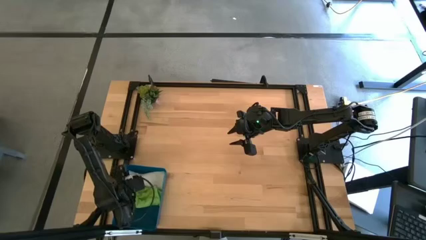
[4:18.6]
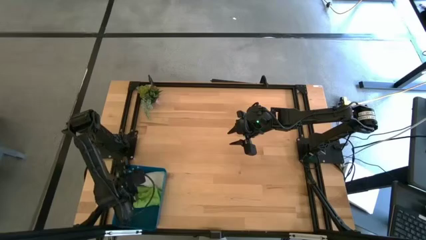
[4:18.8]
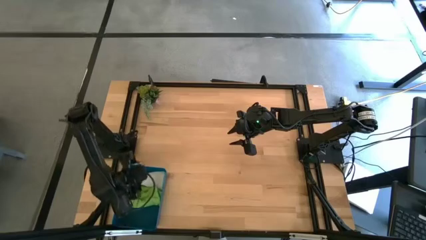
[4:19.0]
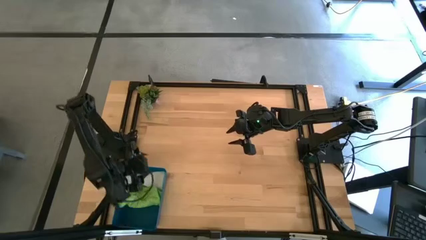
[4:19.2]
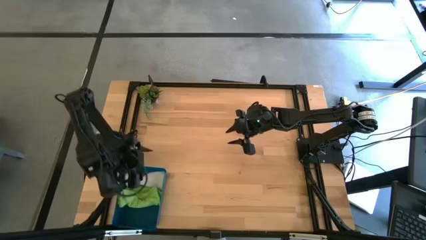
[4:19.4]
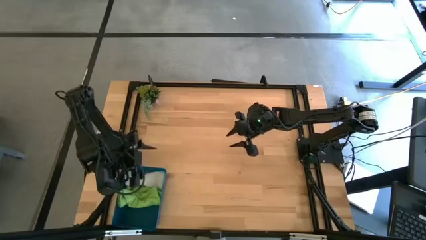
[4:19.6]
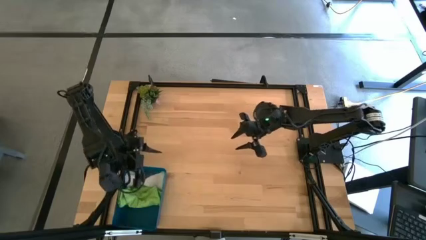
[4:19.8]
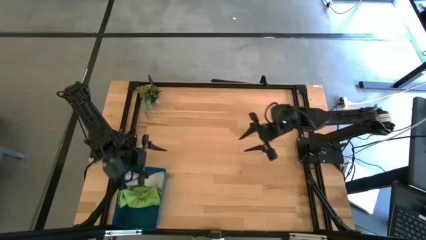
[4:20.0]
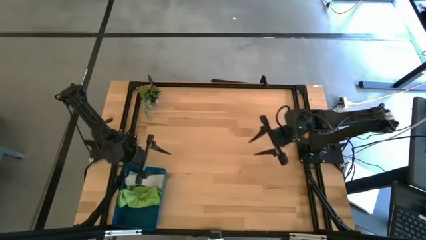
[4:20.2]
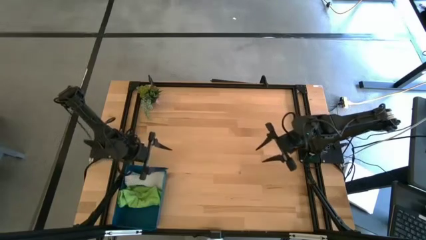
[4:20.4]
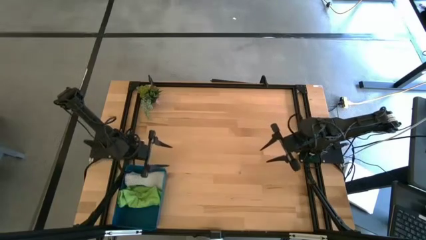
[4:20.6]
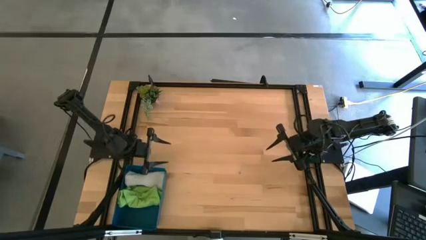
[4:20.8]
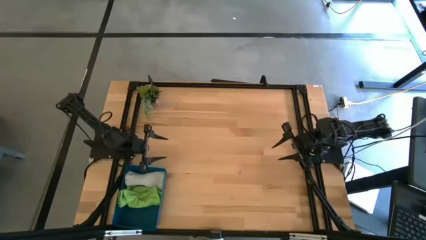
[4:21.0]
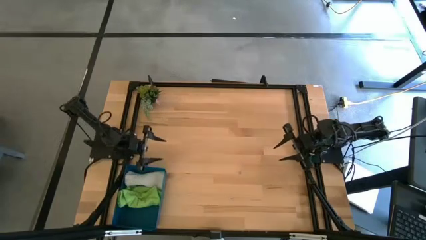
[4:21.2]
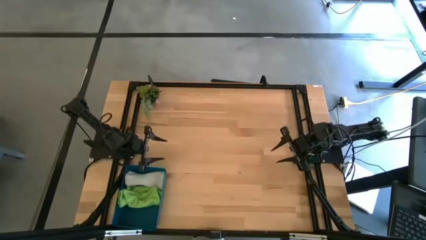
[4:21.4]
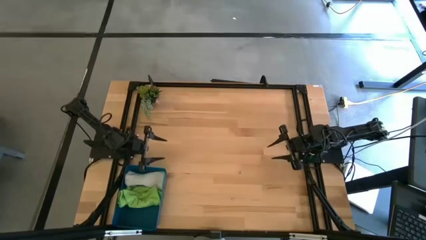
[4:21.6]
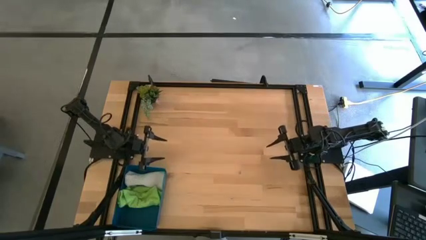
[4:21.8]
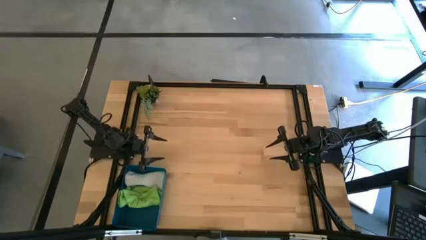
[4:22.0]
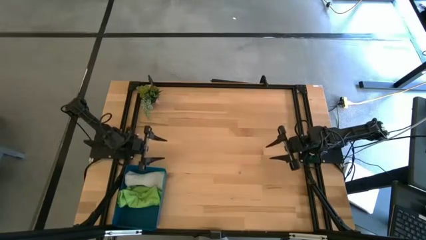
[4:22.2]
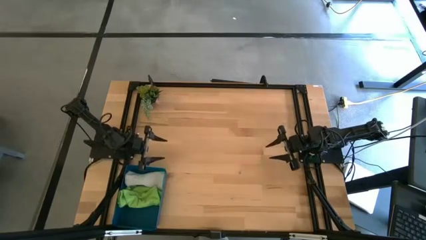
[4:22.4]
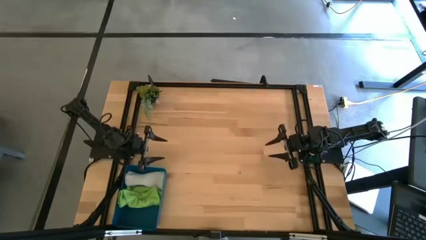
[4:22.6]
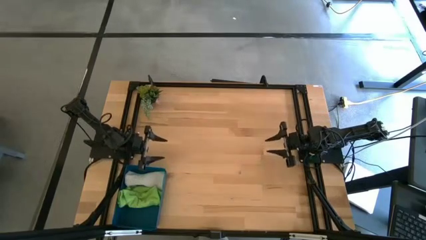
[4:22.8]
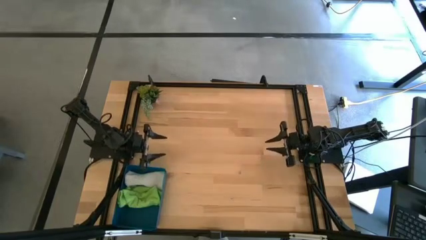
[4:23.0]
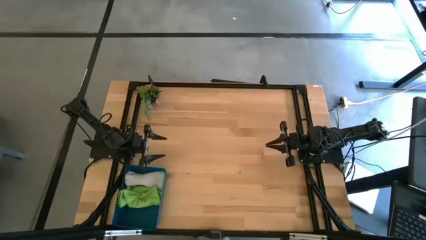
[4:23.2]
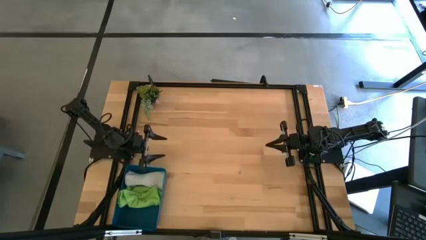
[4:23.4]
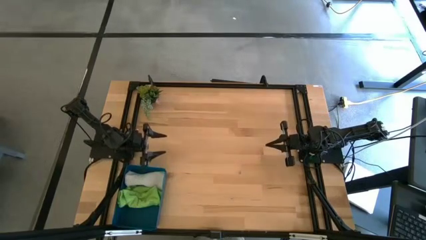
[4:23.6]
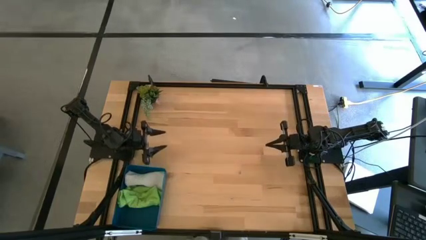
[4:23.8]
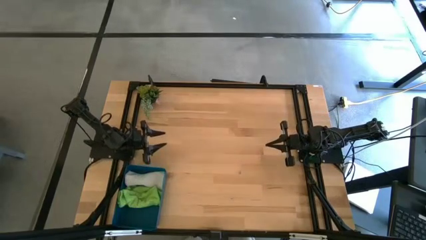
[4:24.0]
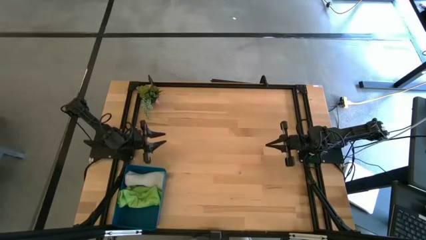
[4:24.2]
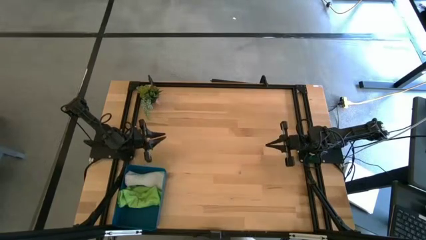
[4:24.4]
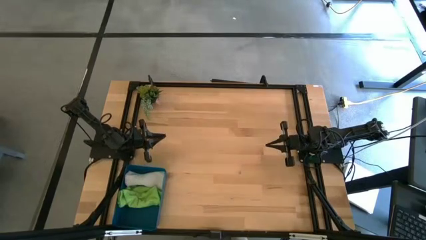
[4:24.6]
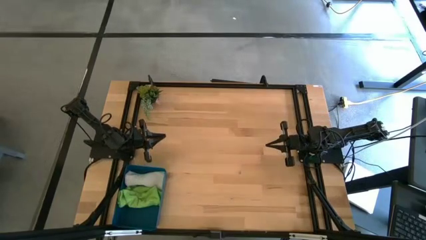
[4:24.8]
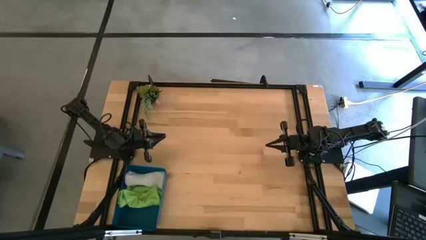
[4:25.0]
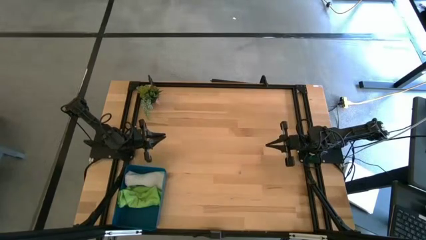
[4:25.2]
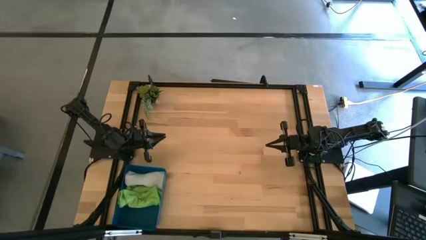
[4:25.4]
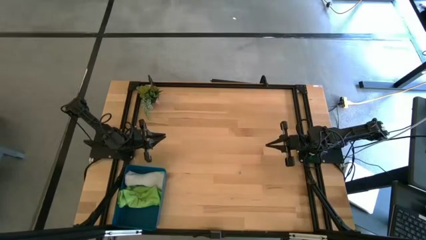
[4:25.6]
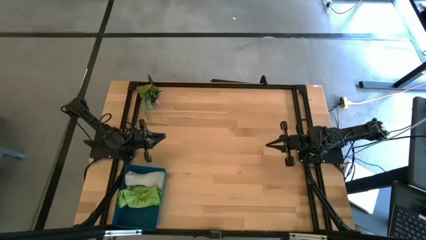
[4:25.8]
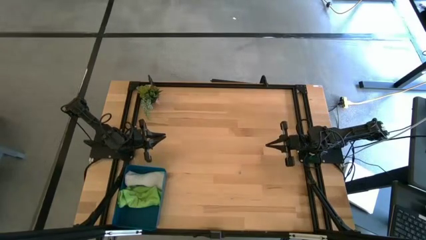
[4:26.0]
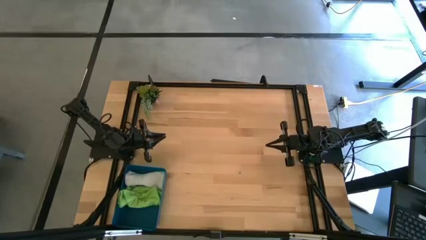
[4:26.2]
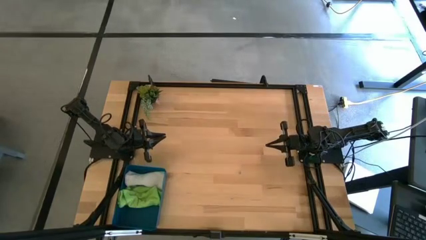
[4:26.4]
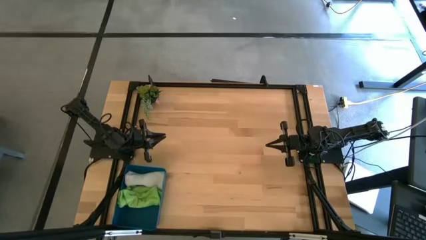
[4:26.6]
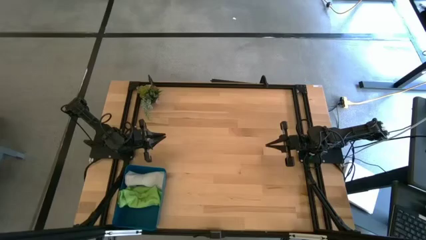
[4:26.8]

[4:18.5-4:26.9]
Task: Roll microfiber towels into tight, uniform cylinder then place into a basket
Return to Home Position

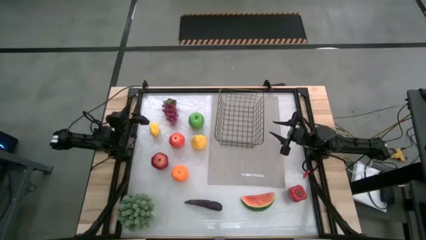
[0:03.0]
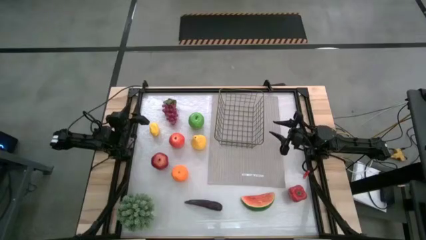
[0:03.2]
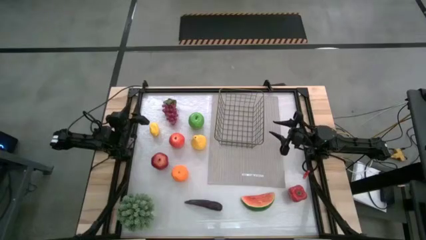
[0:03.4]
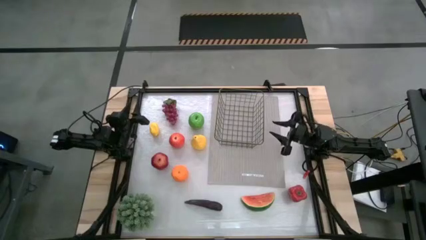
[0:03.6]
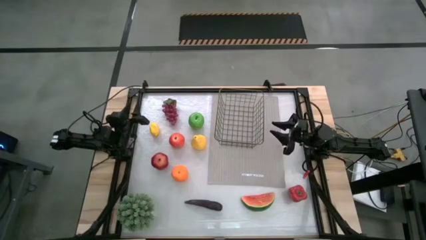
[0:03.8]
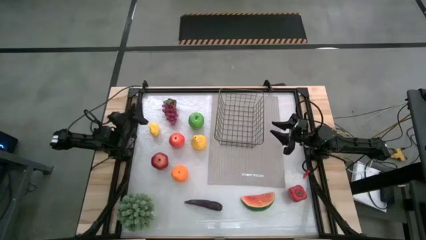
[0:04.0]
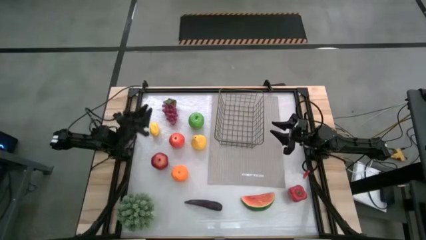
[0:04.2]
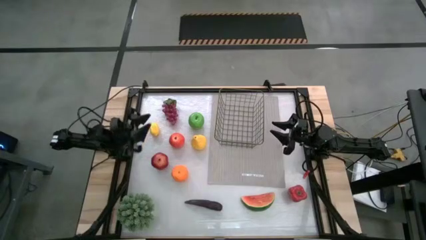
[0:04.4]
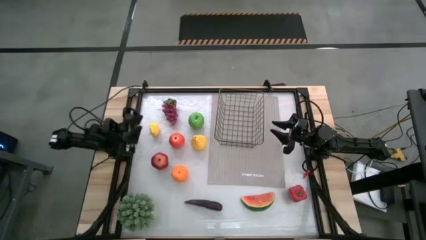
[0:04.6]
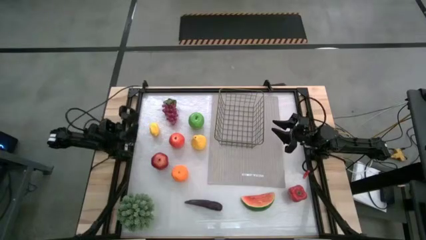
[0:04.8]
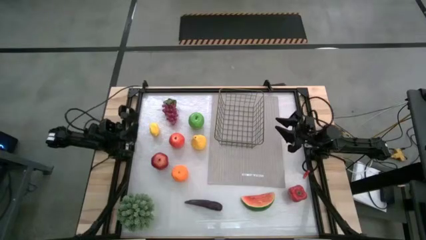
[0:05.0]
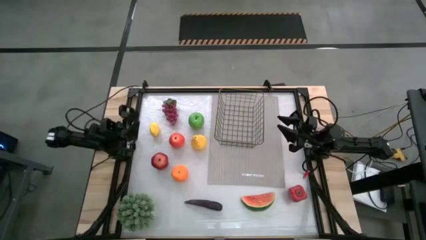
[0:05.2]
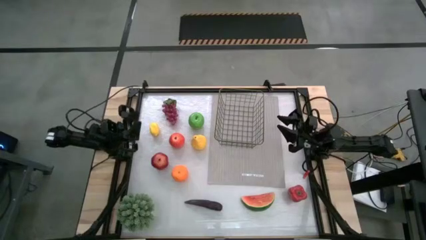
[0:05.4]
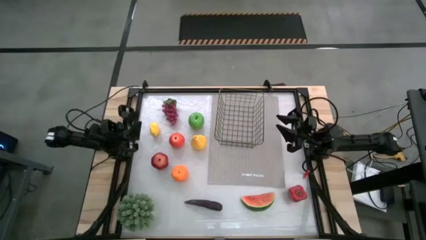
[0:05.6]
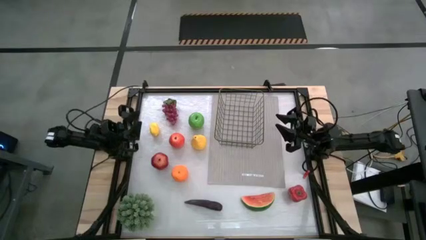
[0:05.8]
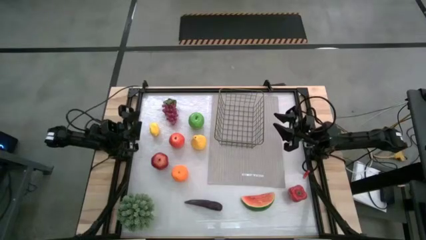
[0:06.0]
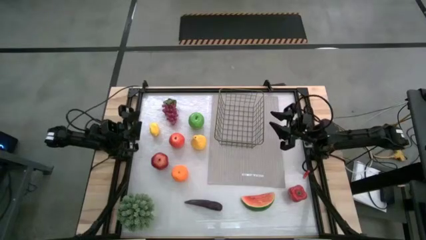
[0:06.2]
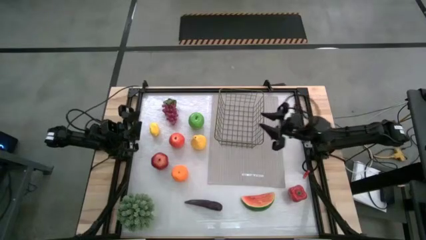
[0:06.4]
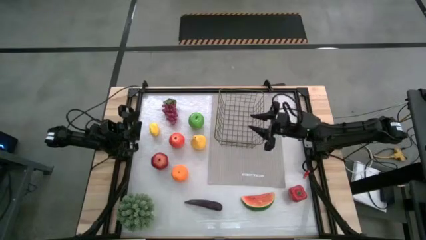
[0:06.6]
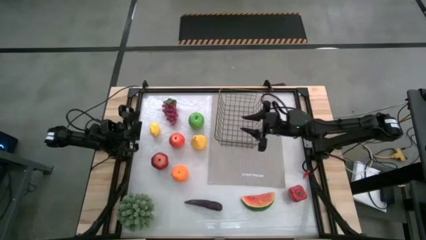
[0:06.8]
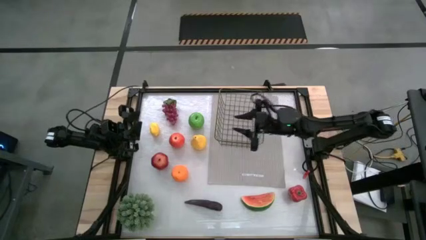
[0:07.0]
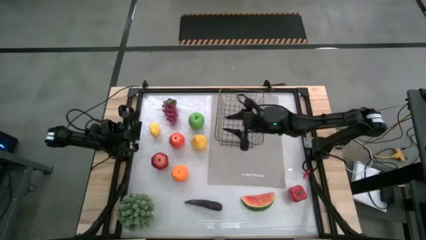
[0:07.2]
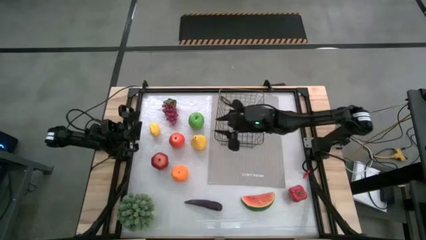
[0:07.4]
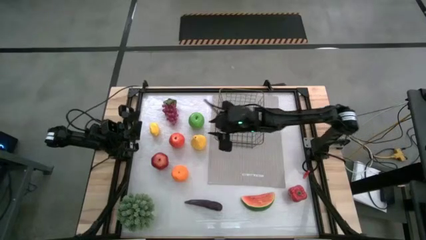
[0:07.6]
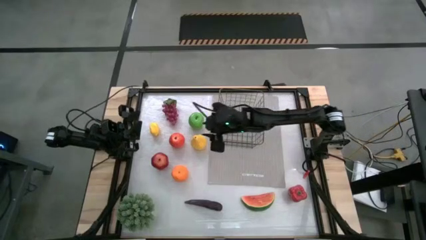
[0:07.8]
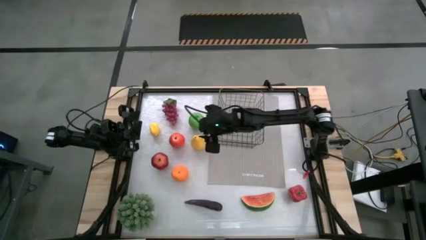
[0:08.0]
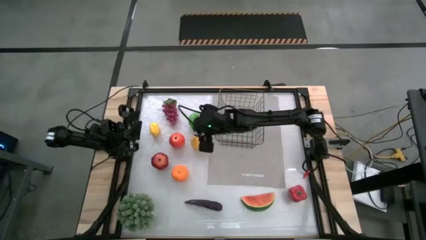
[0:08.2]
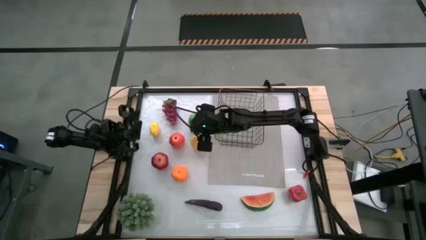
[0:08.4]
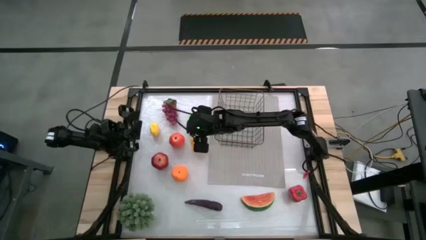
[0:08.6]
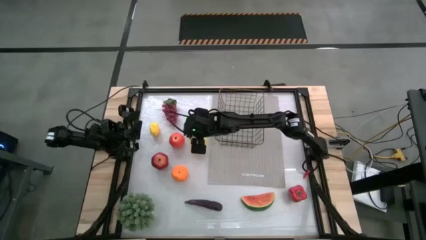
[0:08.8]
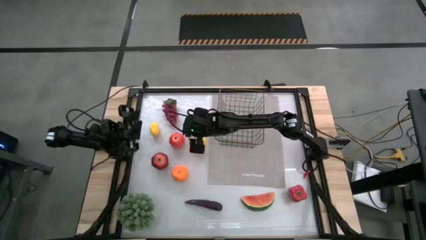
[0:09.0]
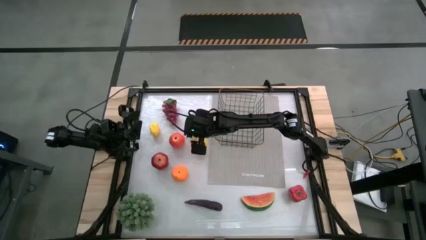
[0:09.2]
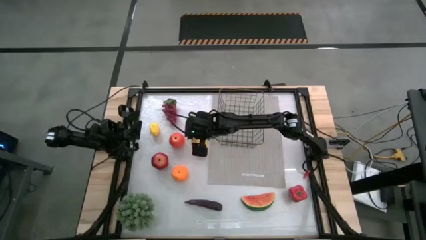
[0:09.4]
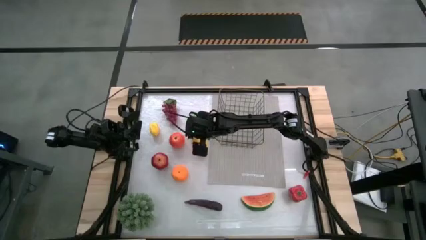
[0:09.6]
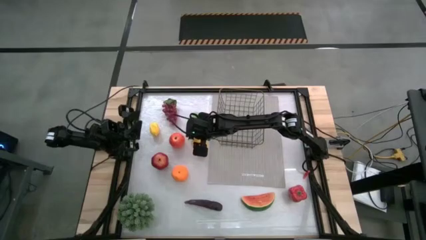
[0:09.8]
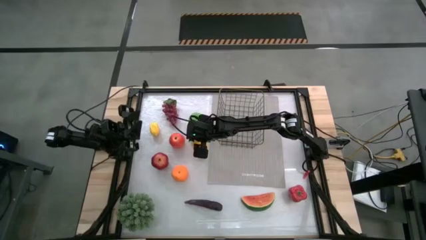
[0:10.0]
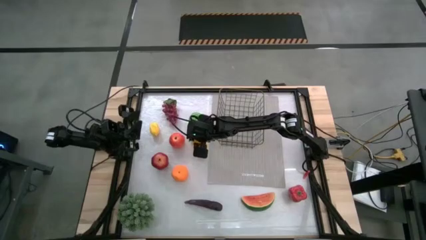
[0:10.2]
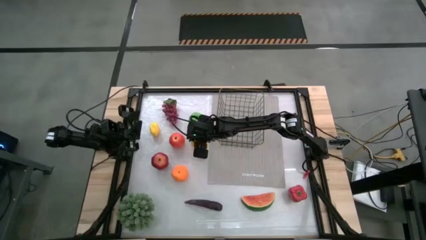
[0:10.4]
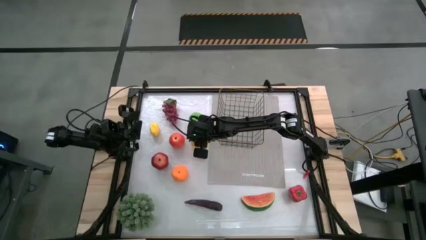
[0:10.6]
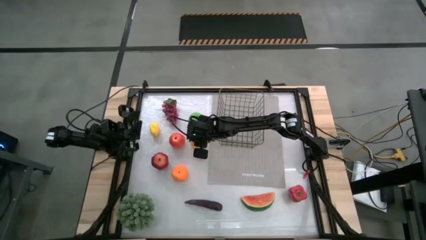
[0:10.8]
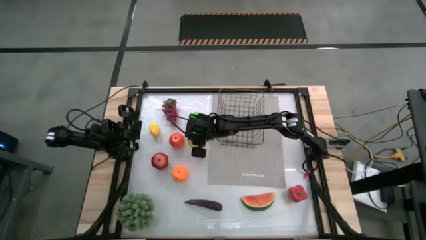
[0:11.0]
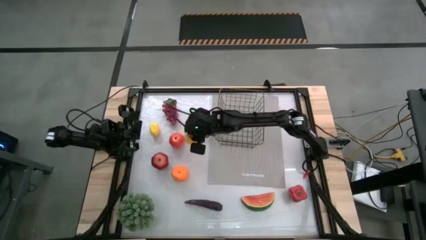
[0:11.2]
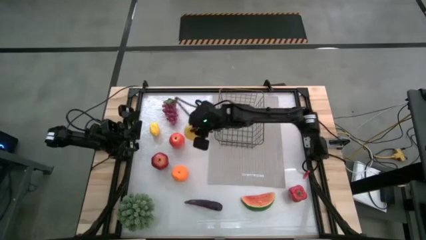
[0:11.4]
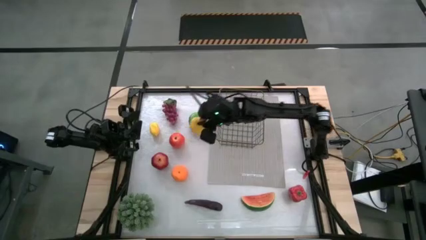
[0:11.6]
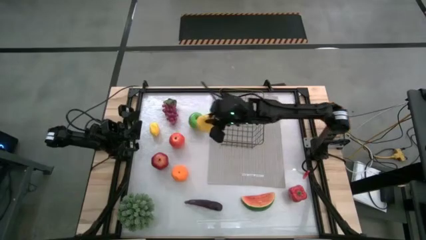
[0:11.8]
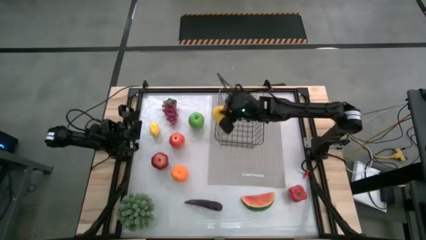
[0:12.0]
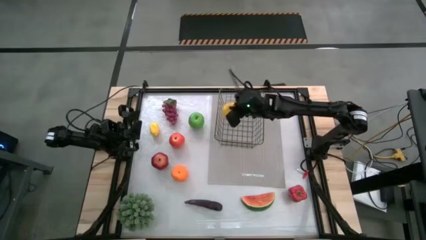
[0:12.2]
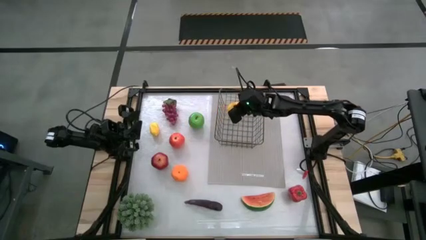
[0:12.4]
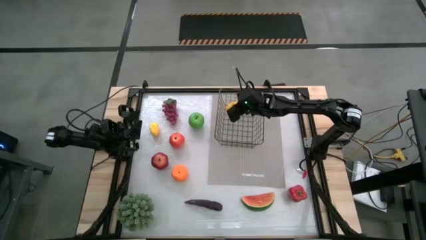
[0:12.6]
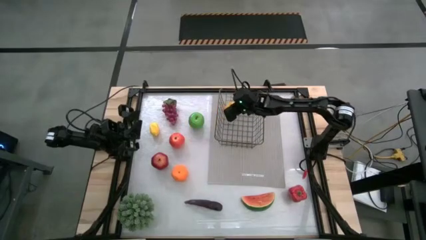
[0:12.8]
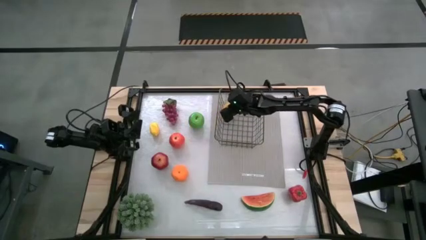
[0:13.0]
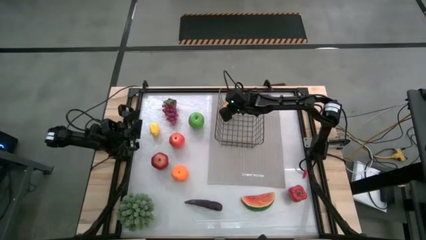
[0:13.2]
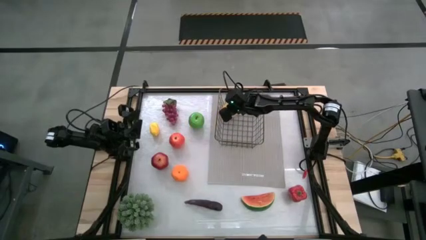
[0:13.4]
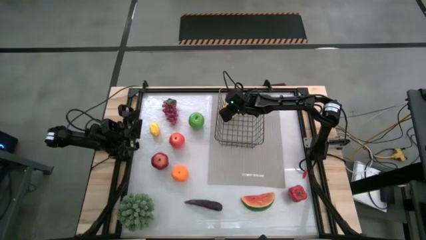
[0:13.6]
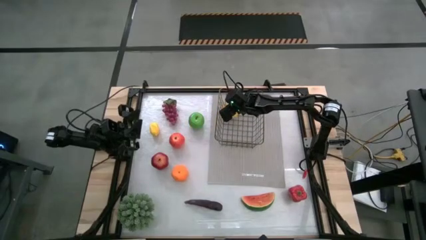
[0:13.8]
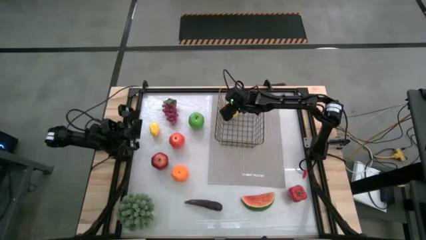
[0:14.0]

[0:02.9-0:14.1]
Task: Build produce basket
Put the pear into the wire basket
